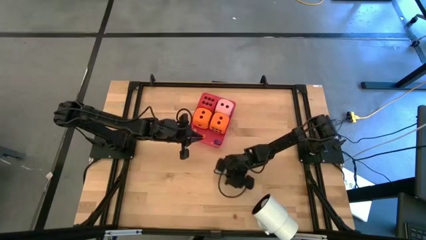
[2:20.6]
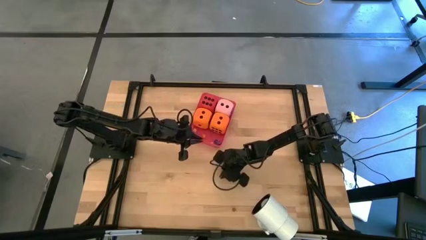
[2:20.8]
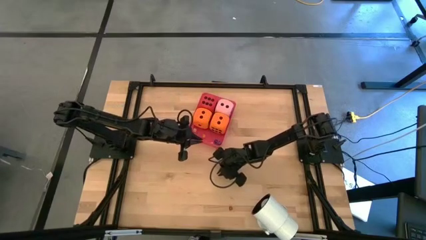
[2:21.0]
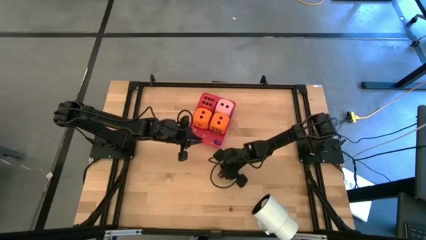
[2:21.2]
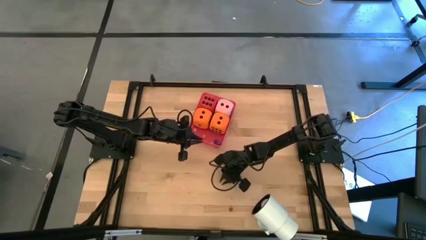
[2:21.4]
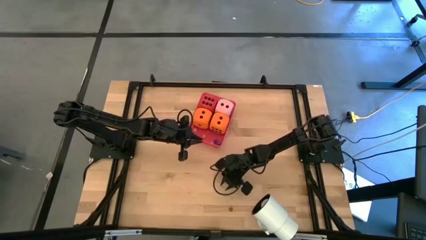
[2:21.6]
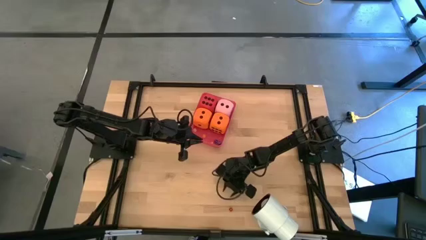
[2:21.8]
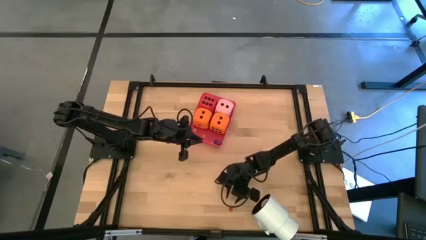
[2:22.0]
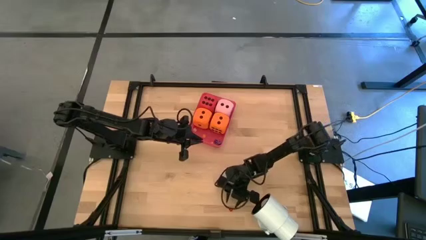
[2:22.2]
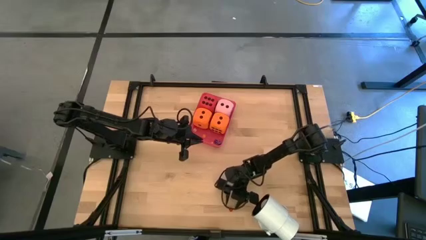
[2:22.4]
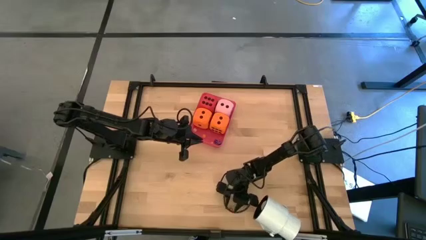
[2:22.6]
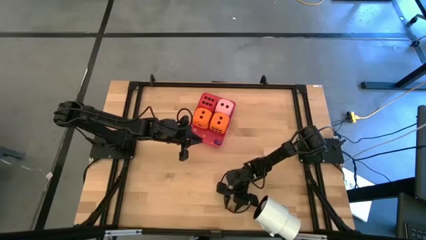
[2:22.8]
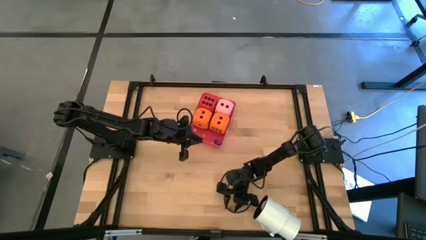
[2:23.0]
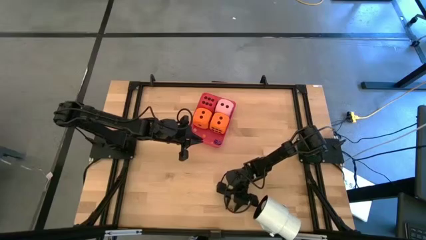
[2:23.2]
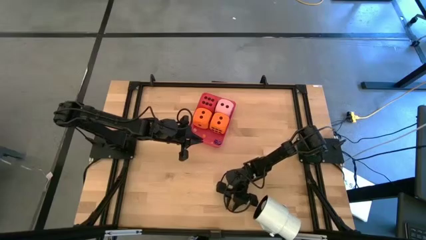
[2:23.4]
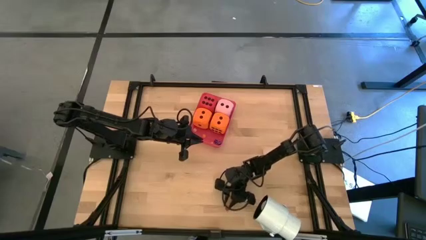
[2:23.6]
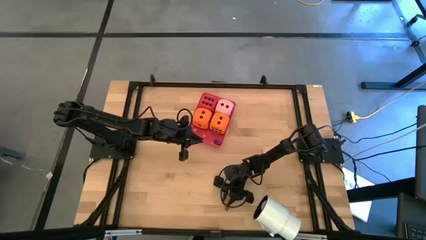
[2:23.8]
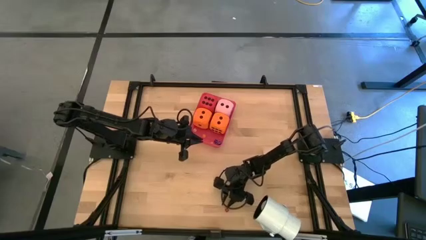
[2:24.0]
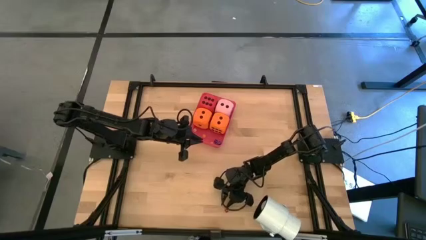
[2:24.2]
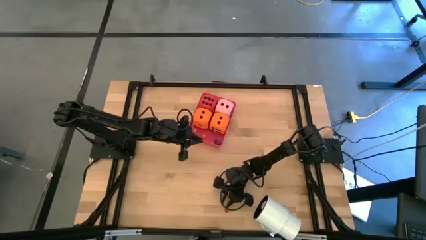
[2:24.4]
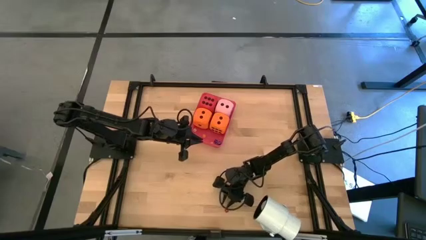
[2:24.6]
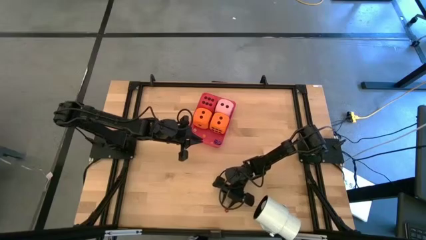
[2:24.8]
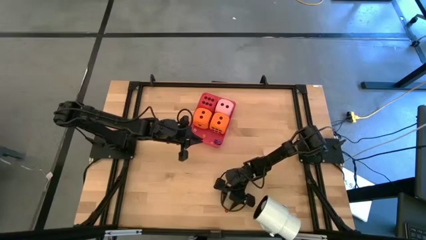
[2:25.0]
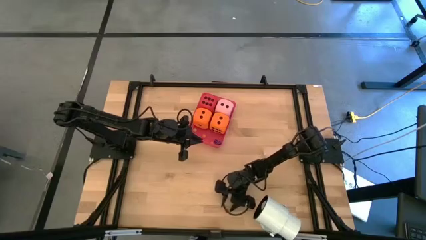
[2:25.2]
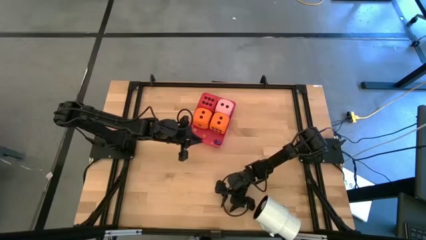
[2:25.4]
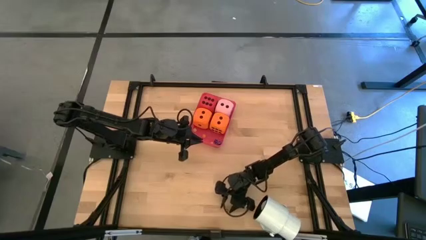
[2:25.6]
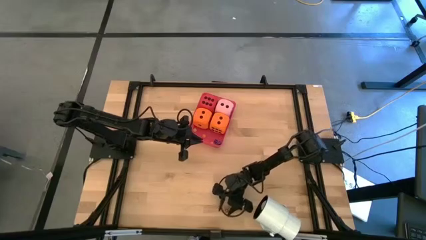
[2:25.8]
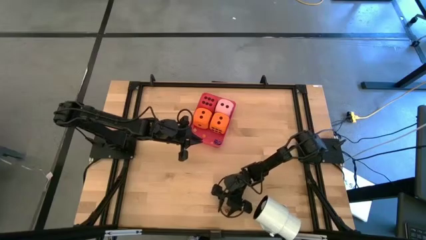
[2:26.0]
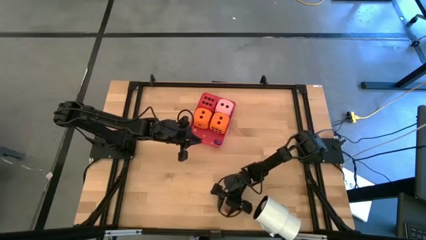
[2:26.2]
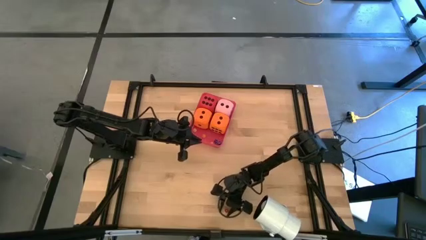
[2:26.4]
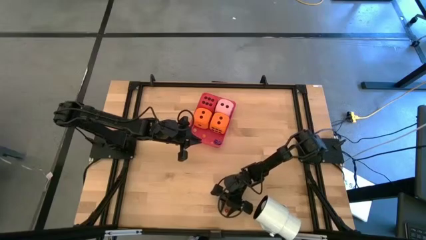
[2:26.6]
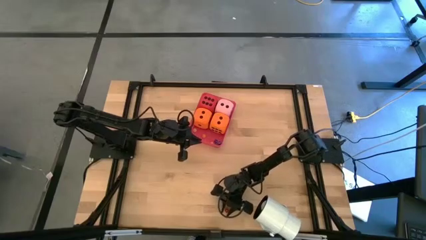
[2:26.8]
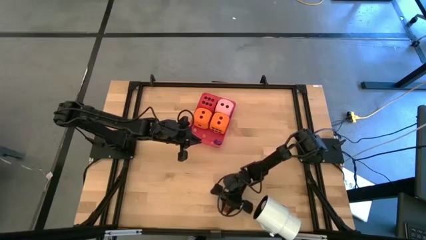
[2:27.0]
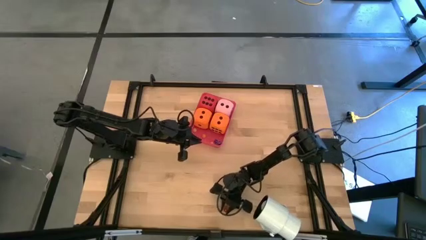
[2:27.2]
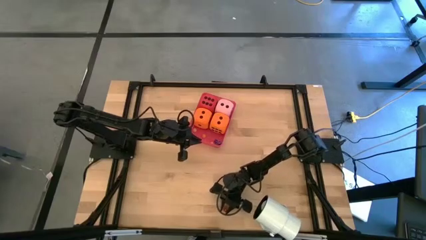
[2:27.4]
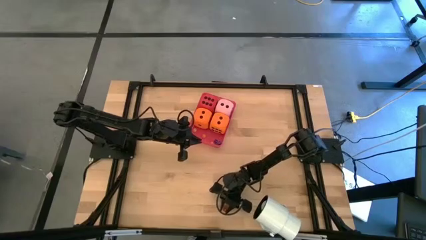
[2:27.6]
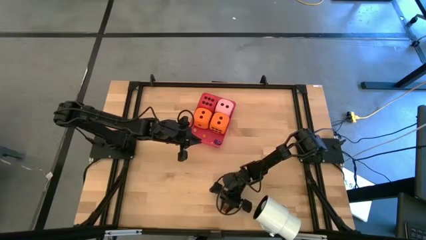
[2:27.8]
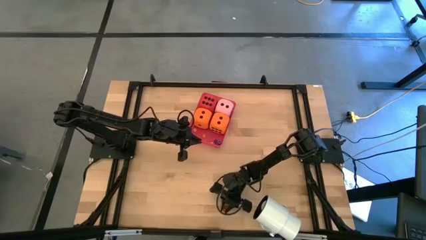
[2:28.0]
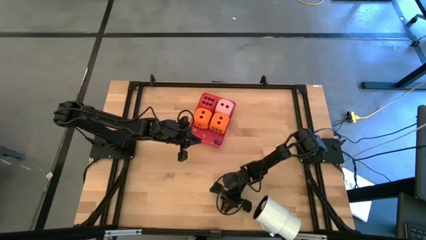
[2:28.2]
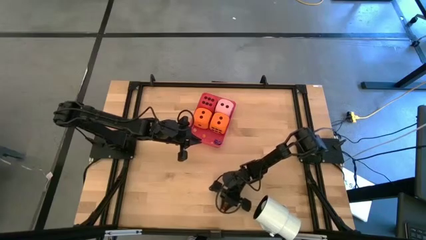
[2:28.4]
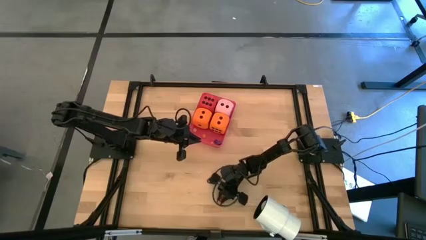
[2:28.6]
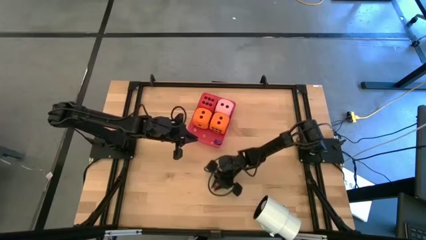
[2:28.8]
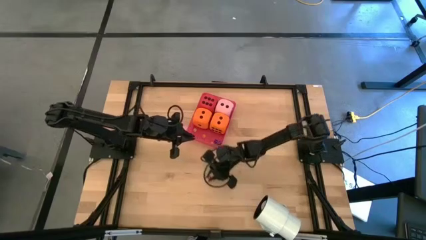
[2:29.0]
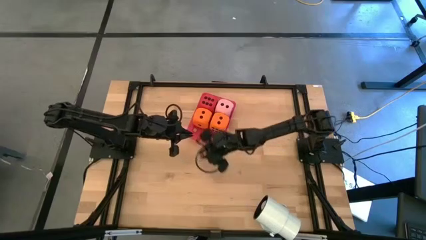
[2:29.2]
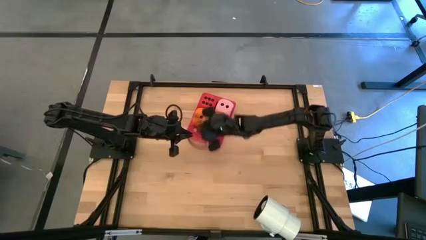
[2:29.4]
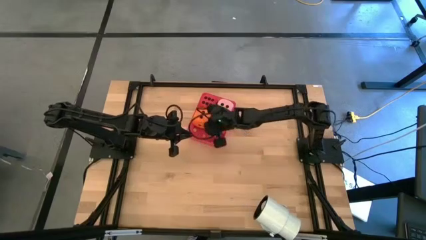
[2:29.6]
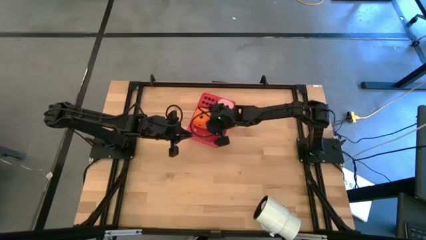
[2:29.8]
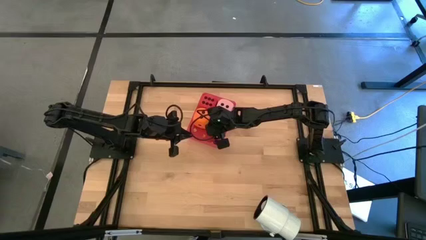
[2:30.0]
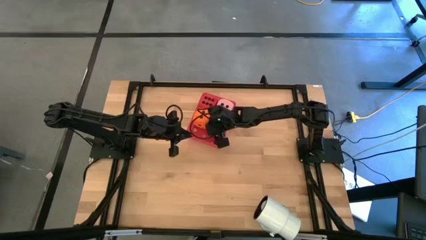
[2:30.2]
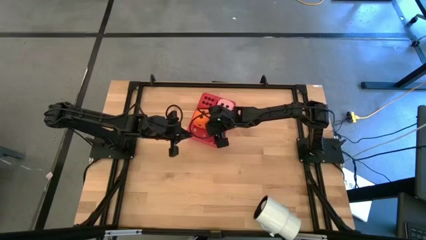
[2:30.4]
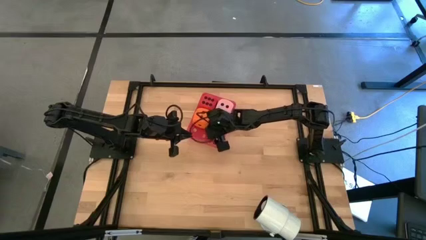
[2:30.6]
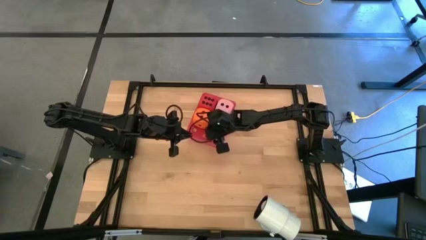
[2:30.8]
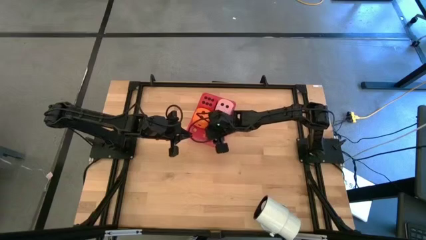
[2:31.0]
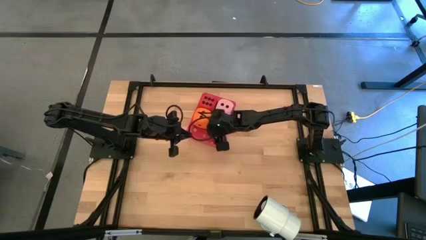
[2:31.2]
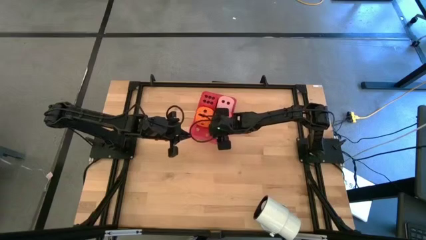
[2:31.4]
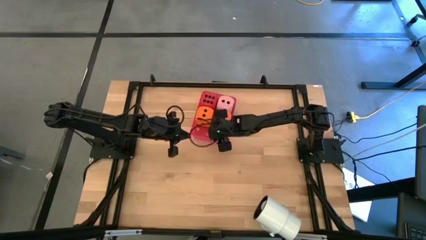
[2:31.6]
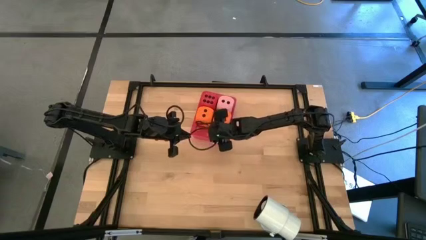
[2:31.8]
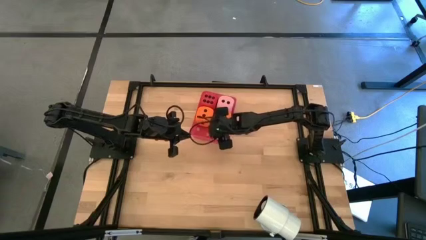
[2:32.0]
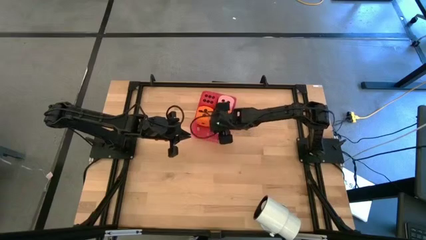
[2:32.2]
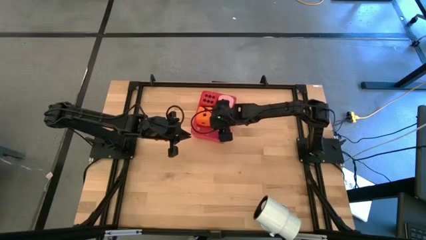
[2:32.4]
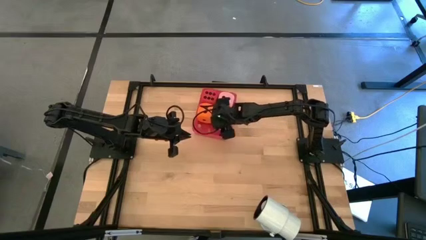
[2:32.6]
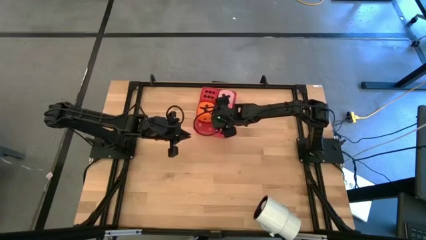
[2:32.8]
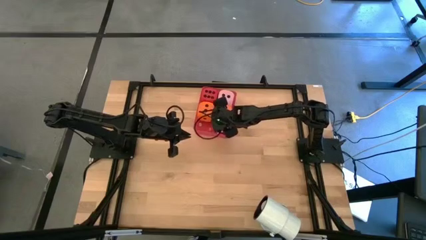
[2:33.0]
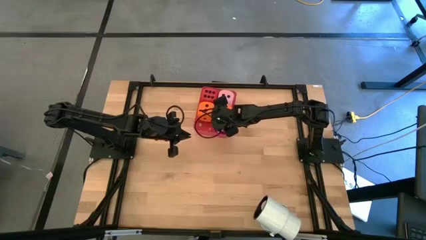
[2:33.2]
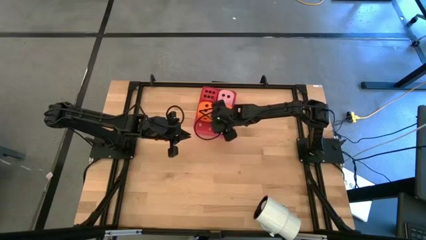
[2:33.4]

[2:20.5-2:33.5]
Task: Pick & Place Dice
Put the small red dice into the red bin

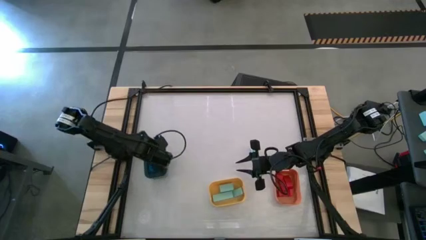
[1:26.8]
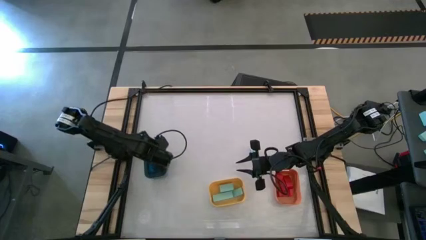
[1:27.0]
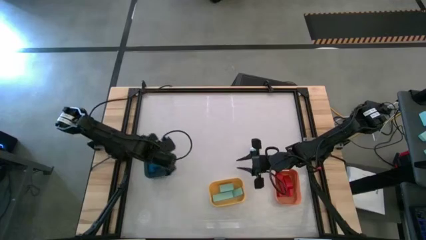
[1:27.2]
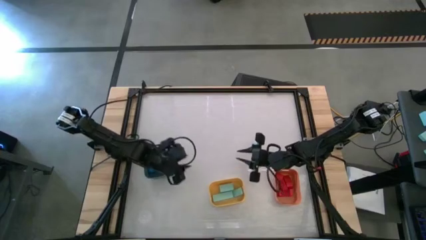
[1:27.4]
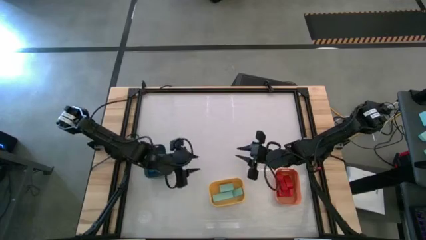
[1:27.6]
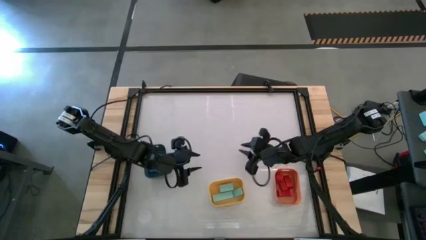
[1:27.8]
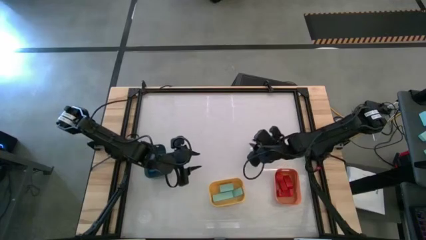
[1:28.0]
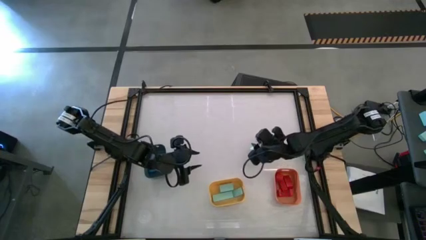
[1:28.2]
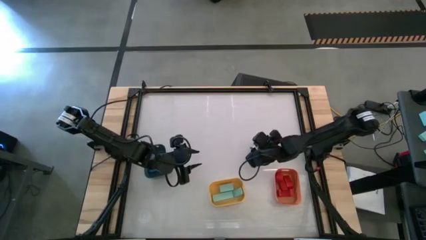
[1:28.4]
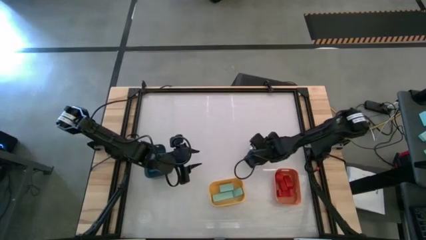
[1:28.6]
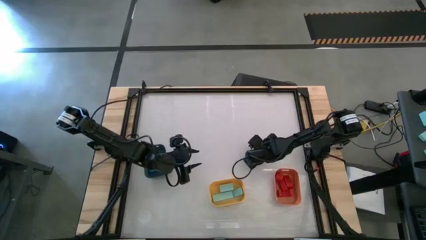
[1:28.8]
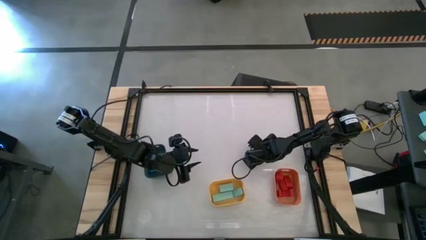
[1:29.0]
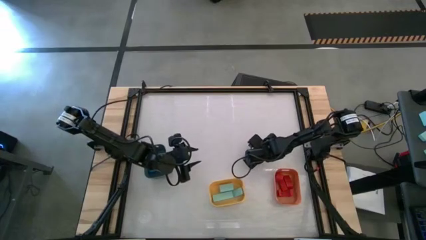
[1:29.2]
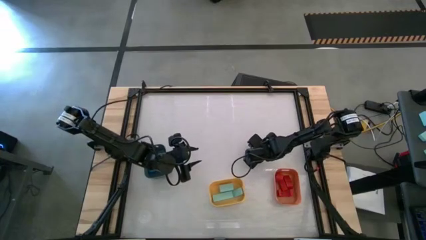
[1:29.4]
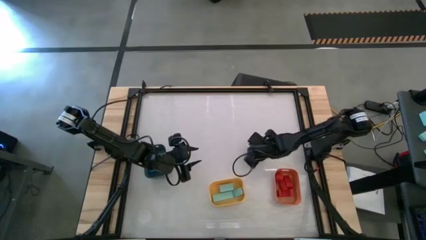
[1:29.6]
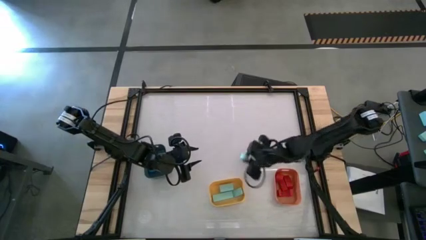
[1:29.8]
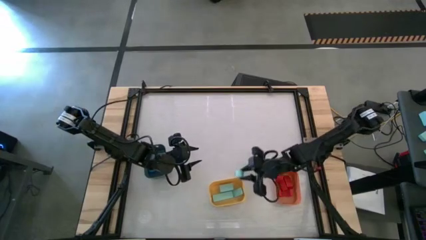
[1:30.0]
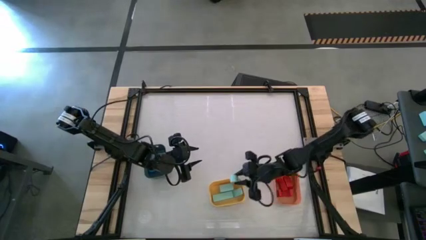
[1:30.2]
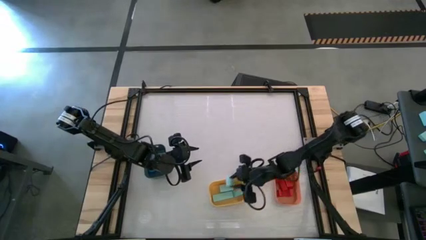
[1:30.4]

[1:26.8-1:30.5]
Task: Sort & place blocks by color
Put the light blue block into the yellow bin
